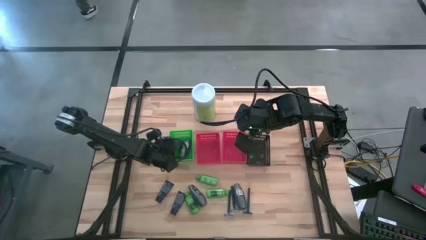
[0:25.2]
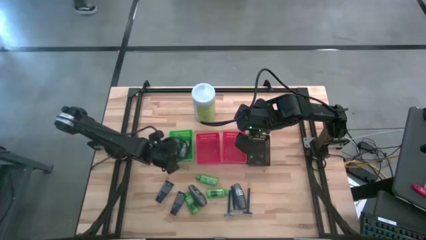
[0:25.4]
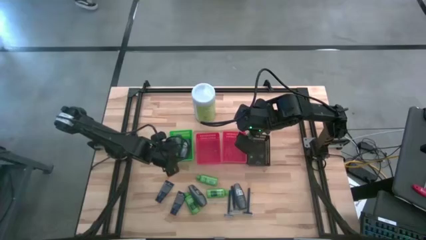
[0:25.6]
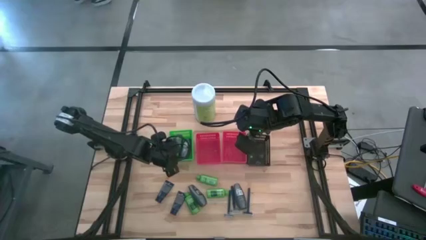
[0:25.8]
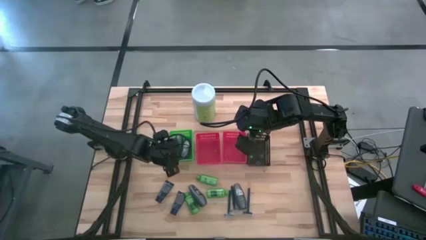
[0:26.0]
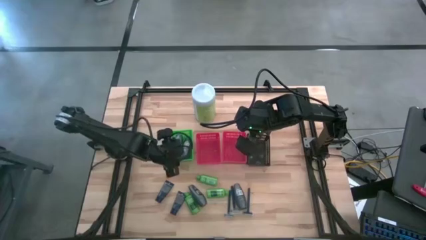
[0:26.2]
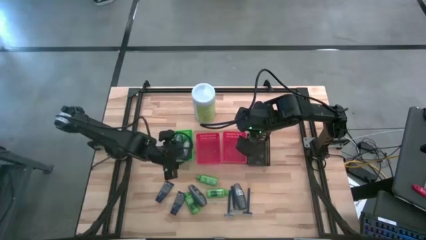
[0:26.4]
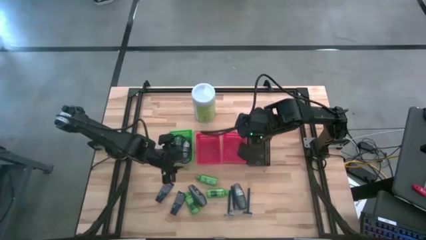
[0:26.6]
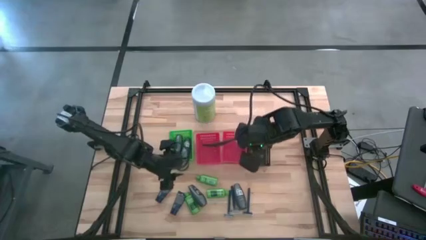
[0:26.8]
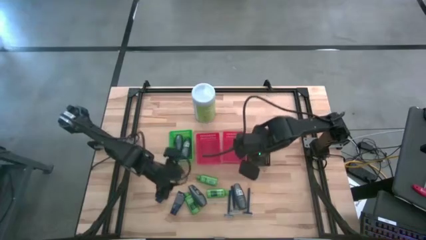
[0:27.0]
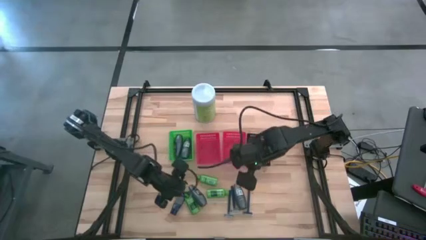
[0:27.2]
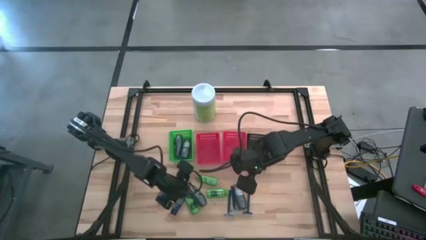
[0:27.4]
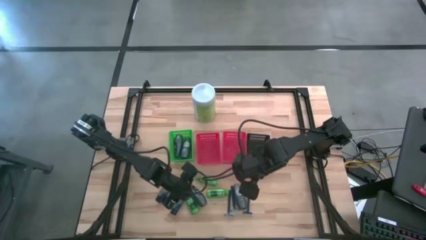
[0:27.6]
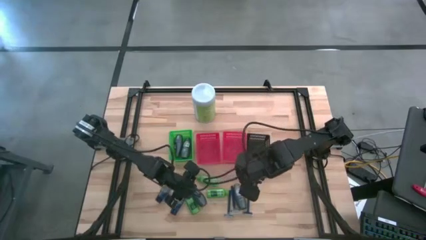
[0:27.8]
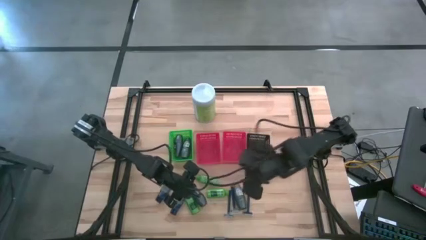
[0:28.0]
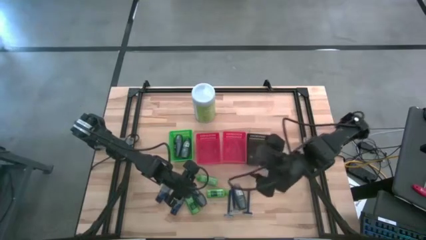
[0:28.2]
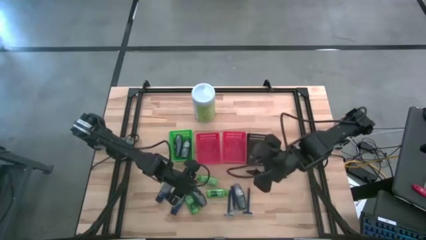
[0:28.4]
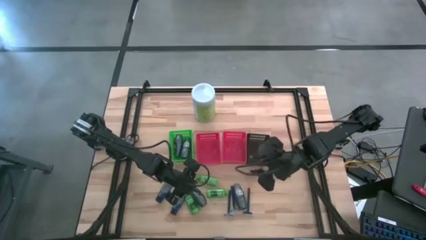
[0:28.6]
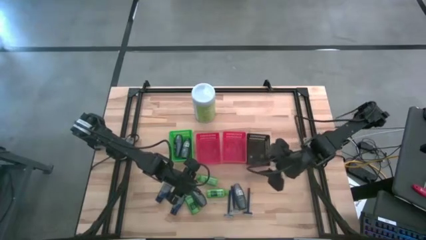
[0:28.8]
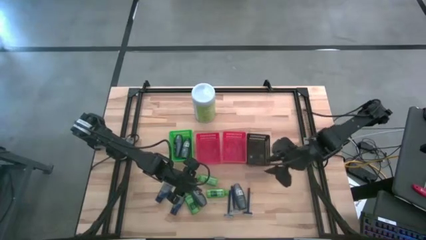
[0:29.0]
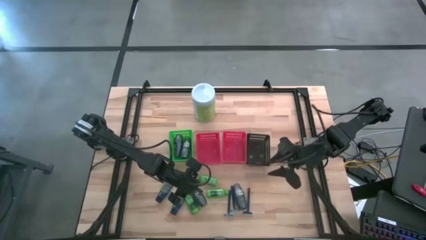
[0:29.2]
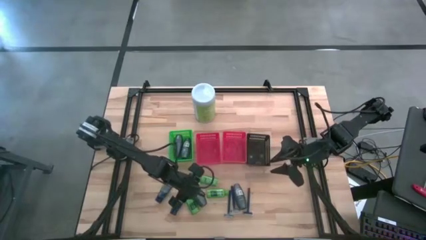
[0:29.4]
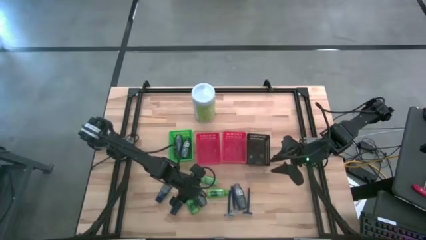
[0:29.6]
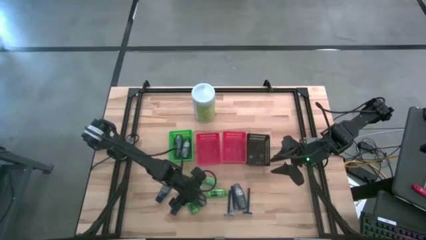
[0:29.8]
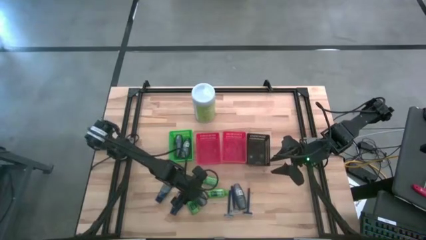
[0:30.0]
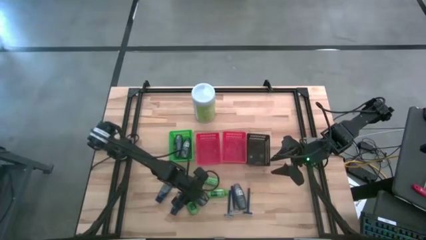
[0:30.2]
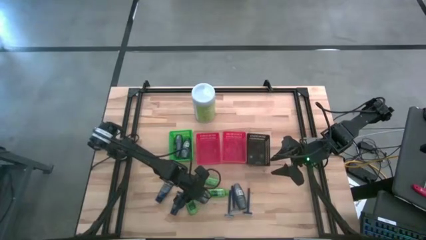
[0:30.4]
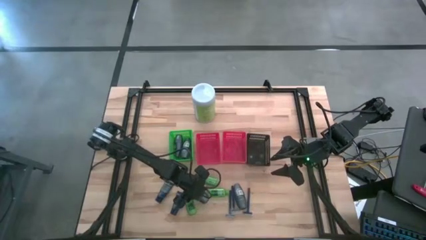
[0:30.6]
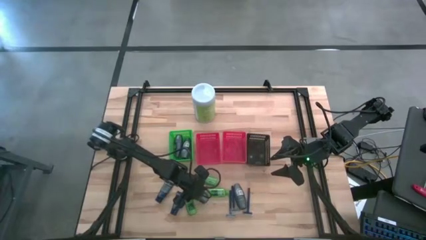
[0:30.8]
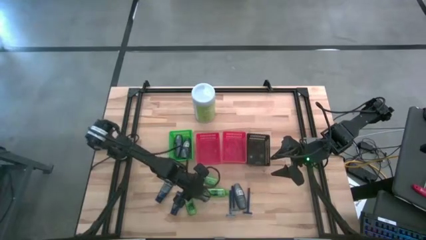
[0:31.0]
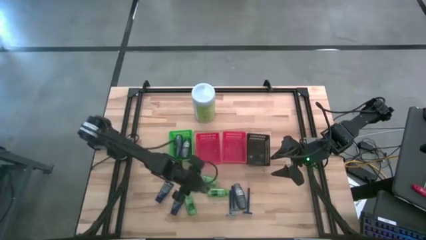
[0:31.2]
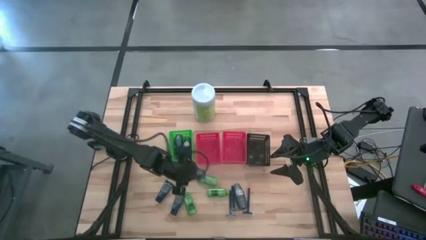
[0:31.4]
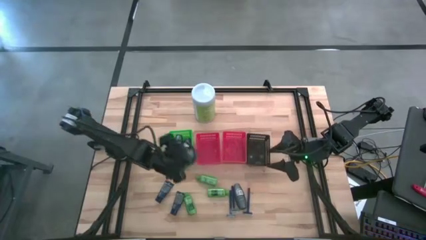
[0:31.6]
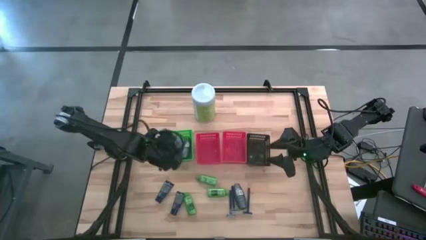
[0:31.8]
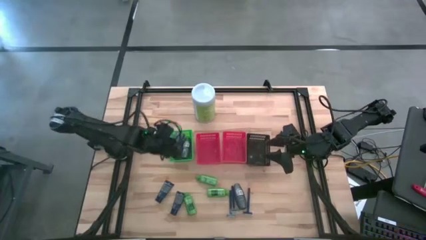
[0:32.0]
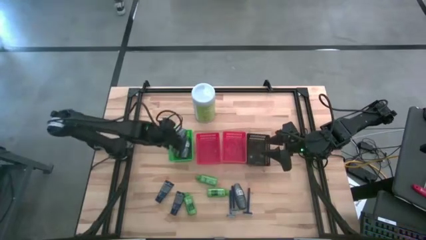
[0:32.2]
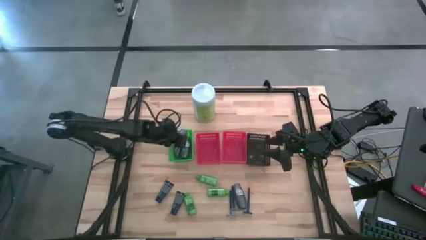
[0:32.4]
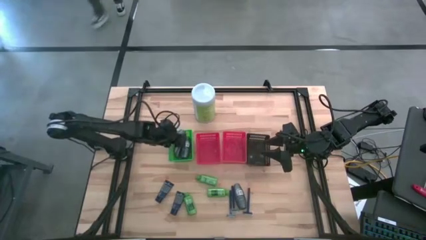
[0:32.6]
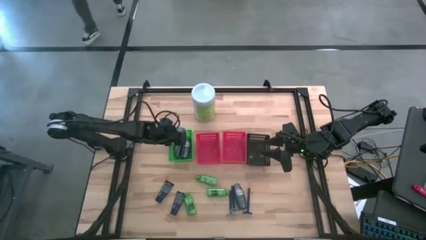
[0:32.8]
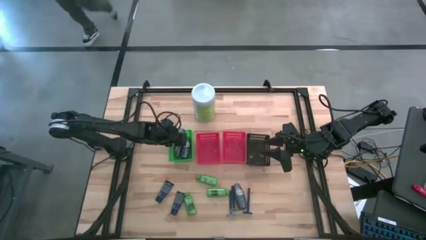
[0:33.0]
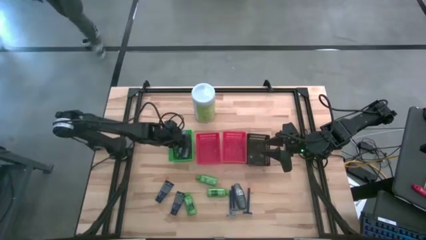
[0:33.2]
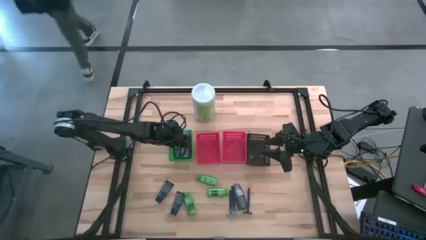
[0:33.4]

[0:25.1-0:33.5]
Task: Pick & Place Travel size toiletries
Put the black deodorant into the green bin
